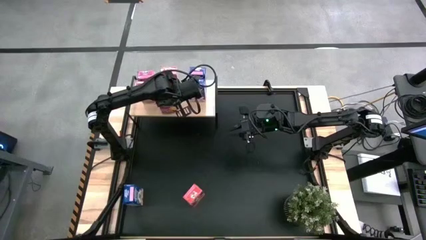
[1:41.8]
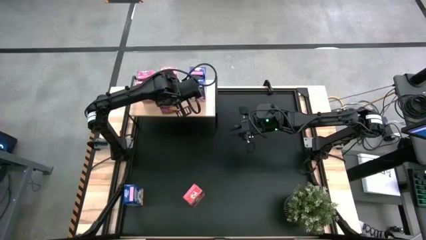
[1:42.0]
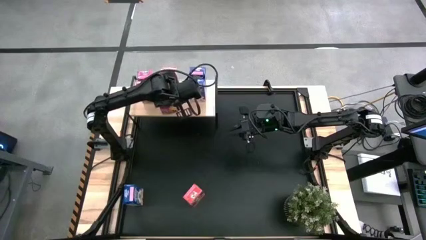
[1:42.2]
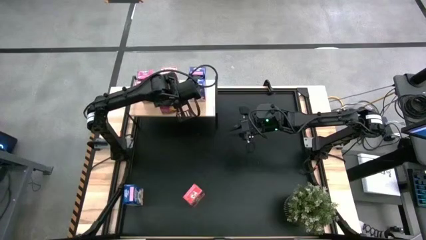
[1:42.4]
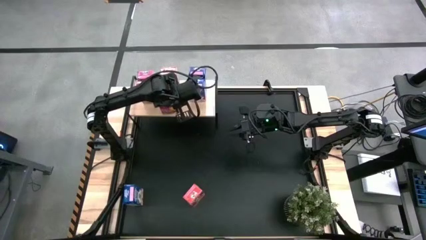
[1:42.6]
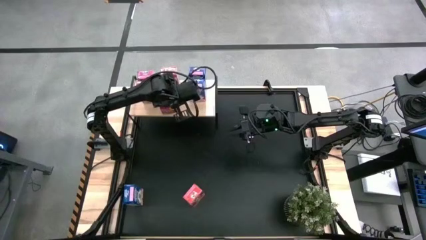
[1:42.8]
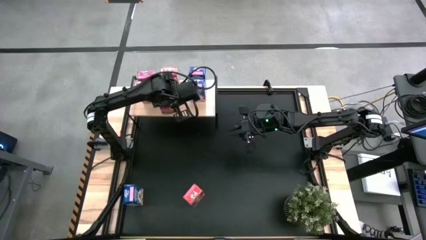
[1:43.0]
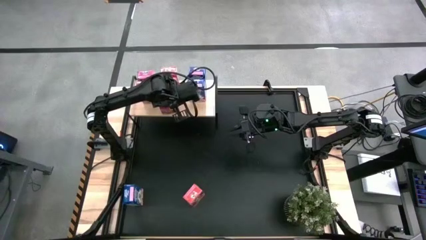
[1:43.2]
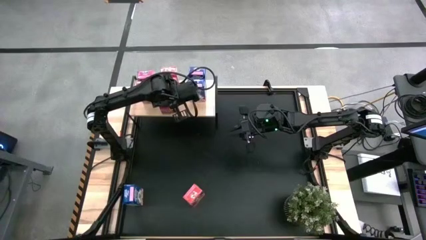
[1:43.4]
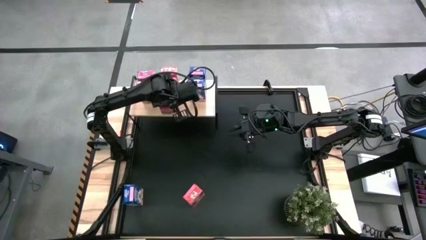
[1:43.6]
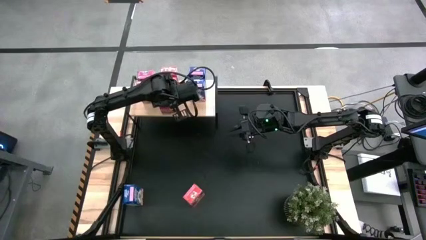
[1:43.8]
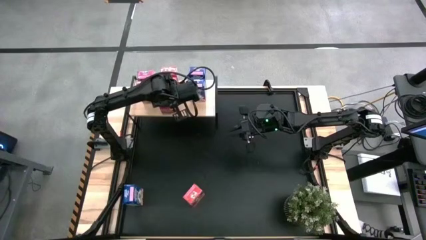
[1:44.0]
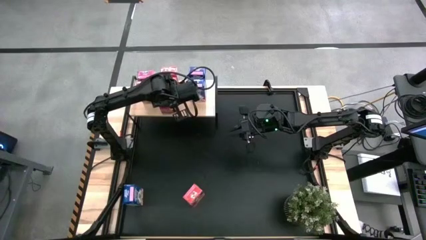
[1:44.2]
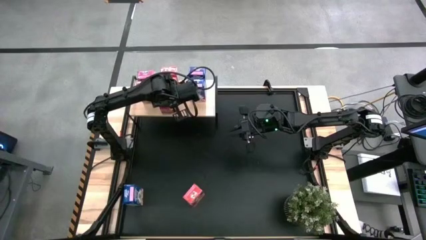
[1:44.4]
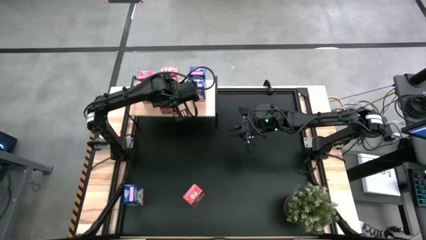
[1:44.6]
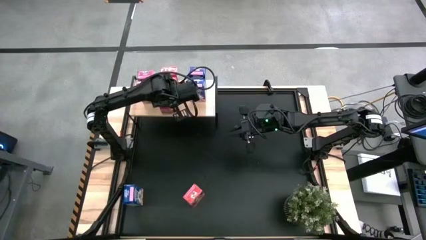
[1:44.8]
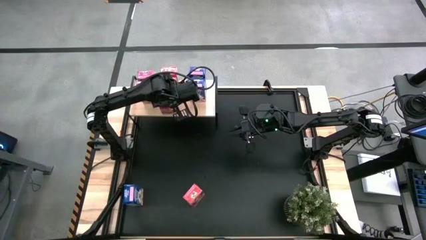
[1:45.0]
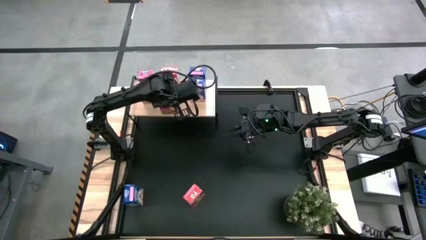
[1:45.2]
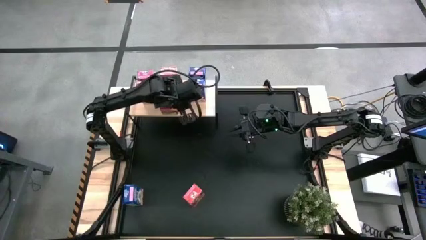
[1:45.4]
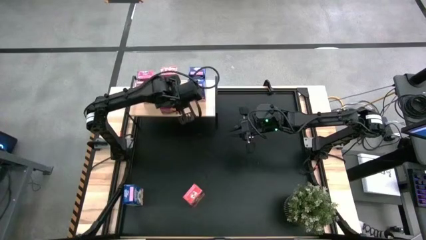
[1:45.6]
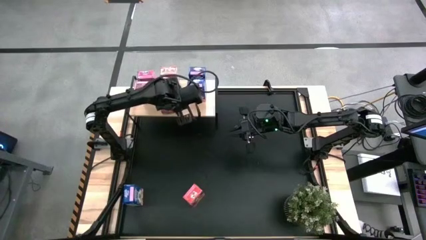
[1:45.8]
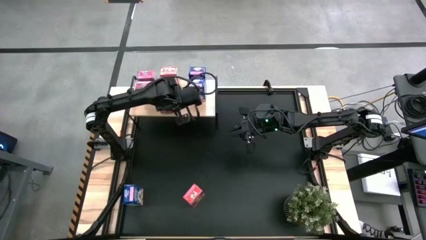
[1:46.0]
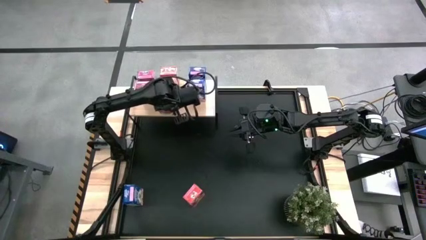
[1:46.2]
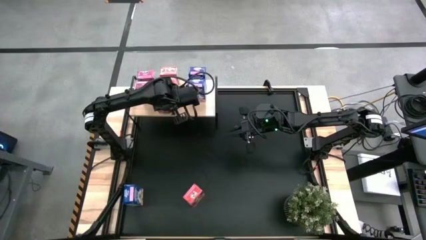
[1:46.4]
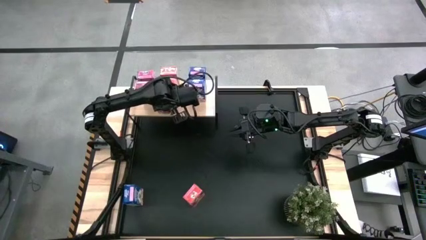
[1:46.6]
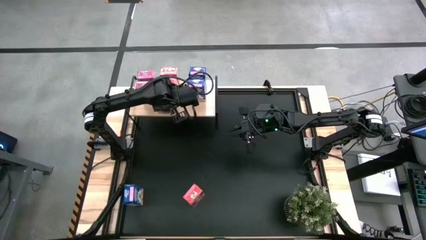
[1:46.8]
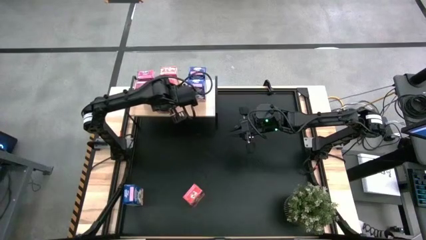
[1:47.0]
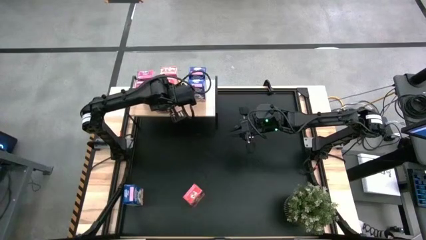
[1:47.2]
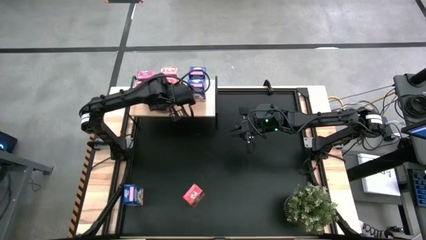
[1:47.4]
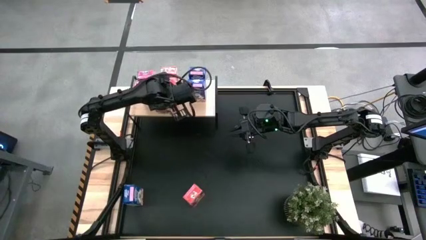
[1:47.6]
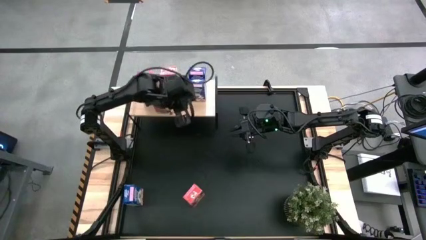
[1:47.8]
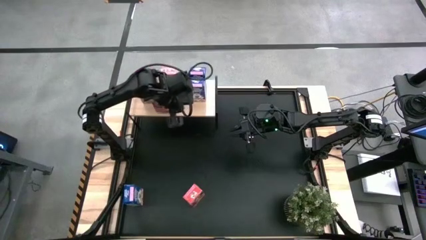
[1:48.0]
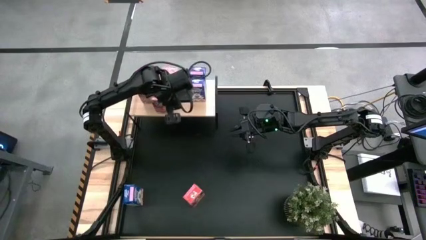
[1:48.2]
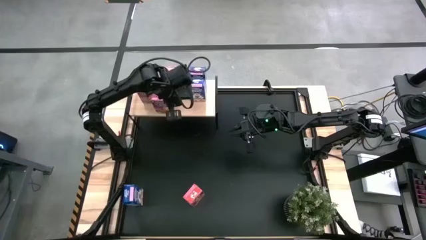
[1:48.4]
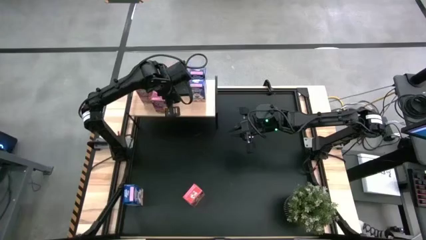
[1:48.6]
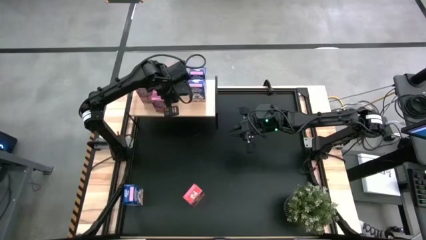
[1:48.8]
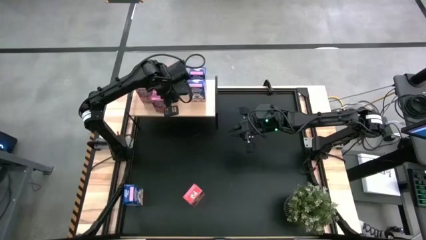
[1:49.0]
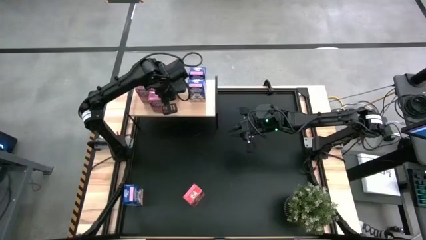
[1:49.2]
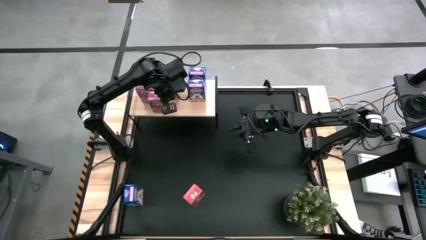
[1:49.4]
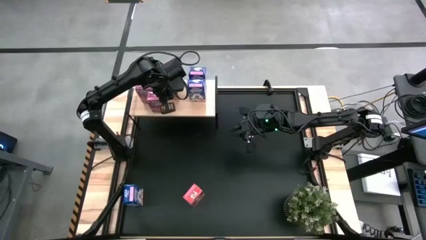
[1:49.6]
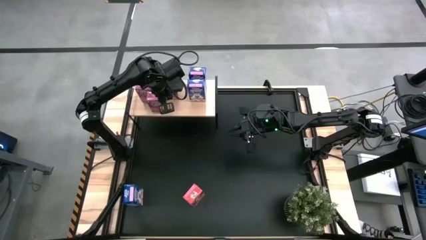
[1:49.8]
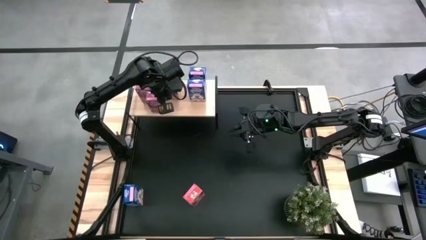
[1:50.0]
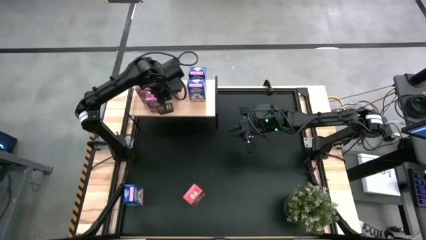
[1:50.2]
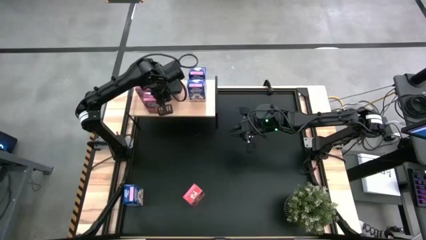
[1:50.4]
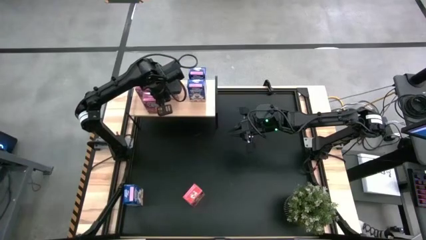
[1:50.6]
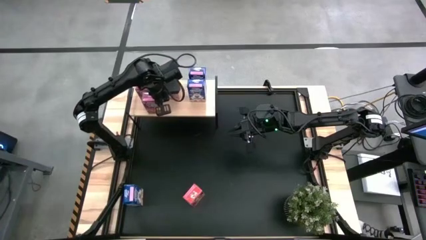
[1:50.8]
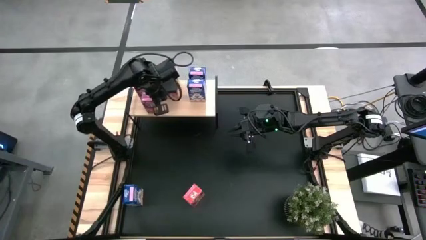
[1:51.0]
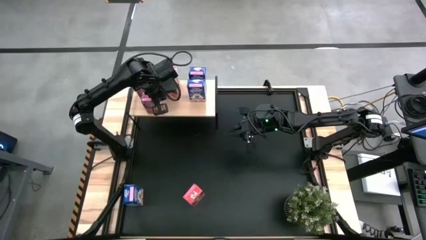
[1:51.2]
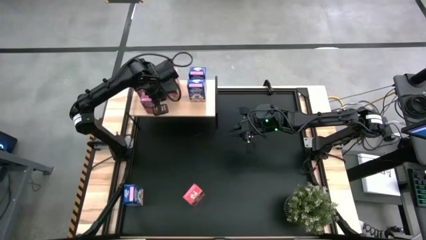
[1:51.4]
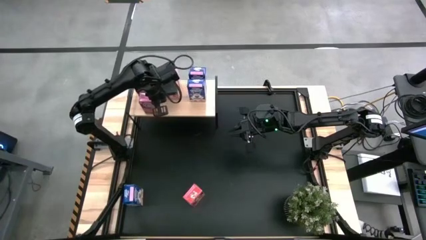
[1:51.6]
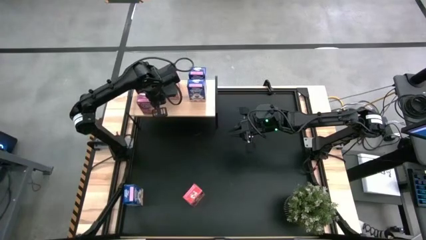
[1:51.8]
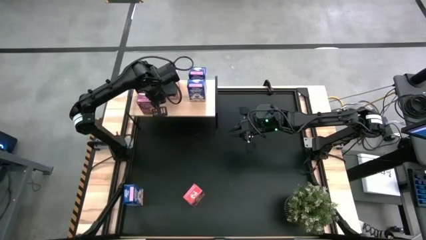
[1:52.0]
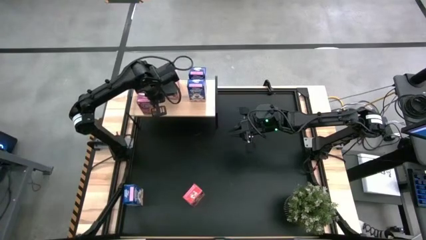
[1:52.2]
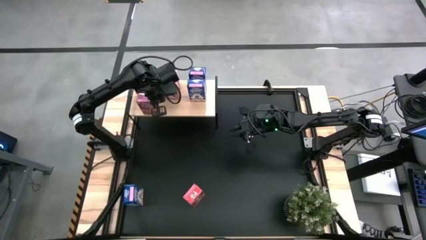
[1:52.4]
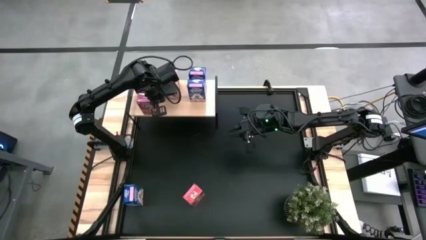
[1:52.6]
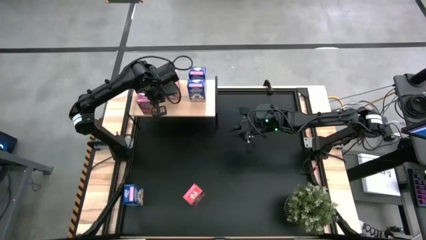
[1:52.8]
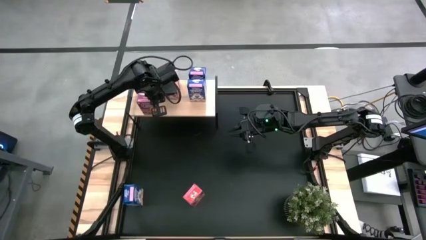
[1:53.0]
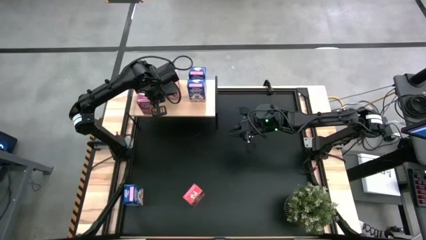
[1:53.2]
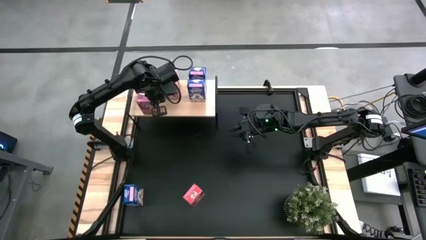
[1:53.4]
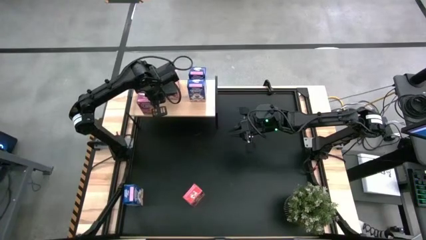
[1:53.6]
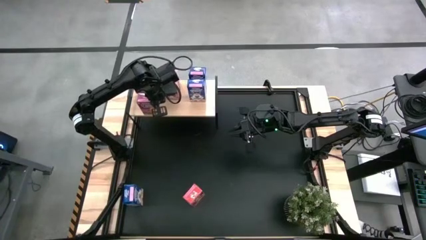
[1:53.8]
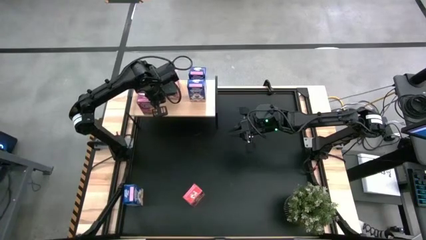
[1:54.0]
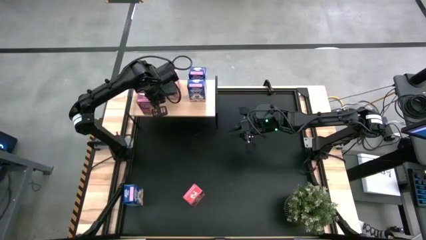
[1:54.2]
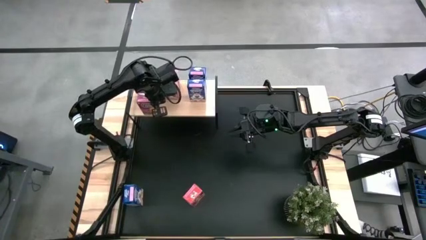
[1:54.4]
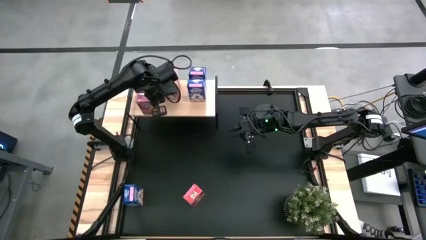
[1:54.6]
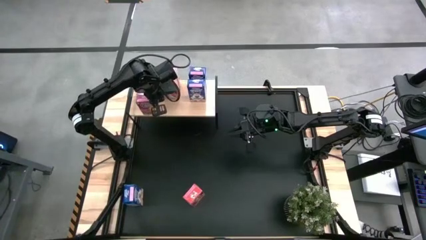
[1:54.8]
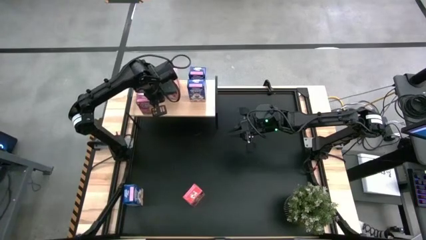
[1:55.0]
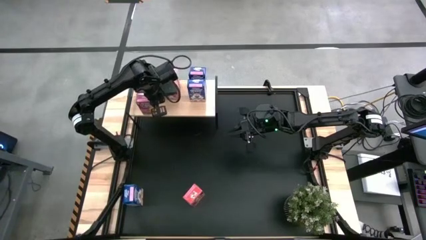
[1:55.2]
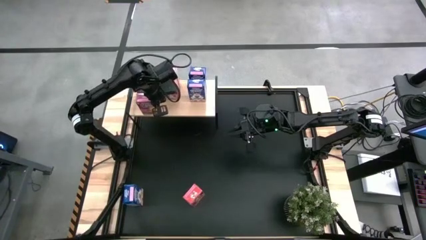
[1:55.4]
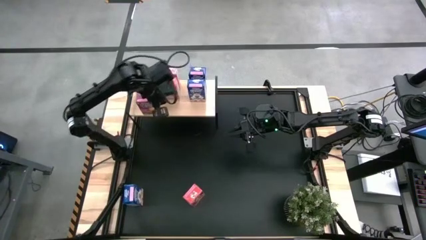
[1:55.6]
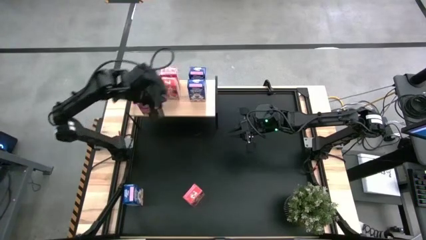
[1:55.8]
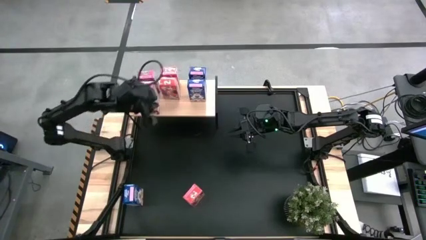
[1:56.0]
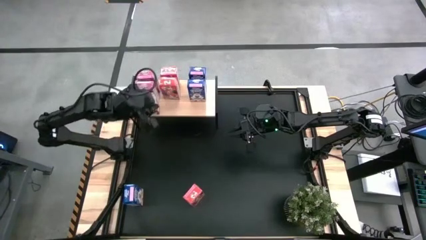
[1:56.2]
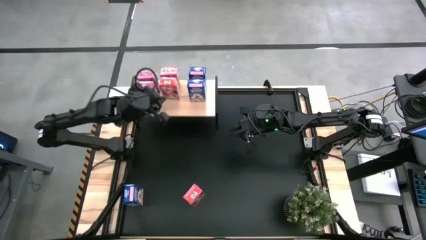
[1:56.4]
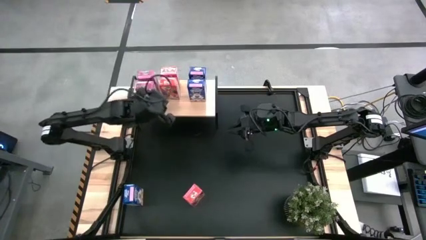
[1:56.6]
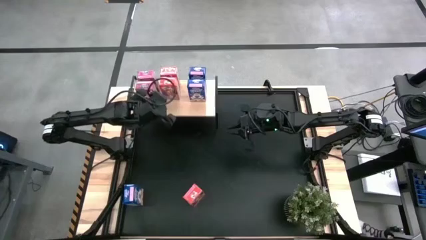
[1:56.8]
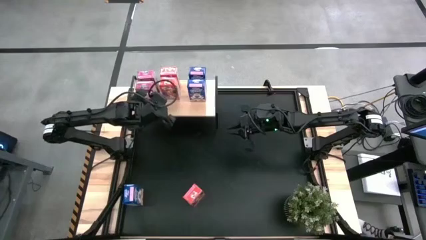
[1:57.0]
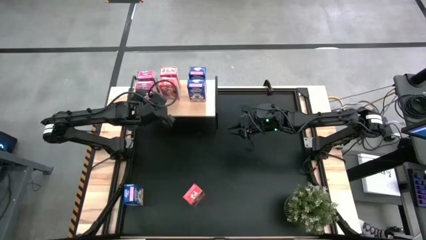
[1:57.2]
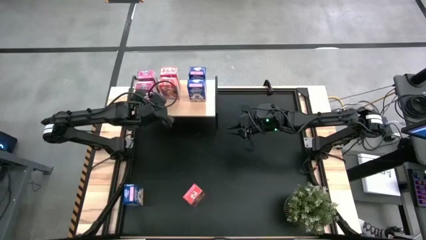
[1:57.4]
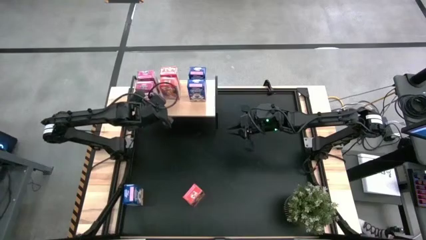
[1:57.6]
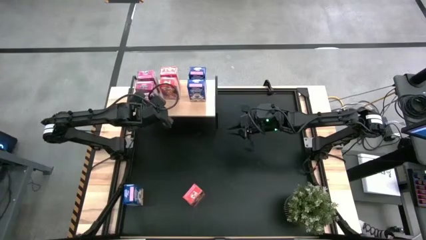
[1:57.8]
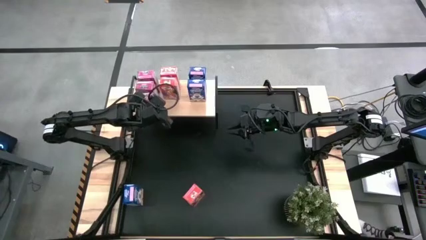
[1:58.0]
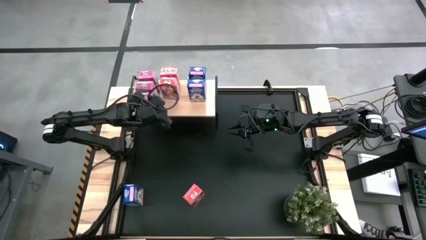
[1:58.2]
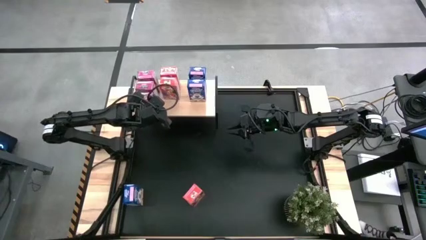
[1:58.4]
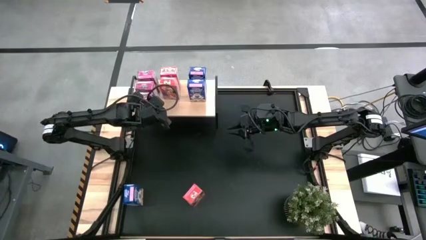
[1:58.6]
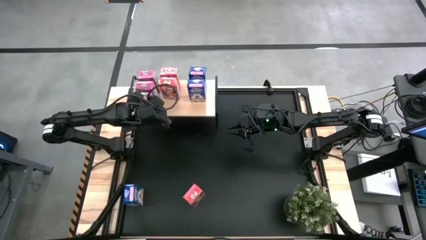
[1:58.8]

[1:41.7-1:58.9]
Task: Stack cereal on shelf
Align the purple cereal box with the other purple cereal box on the shelf
